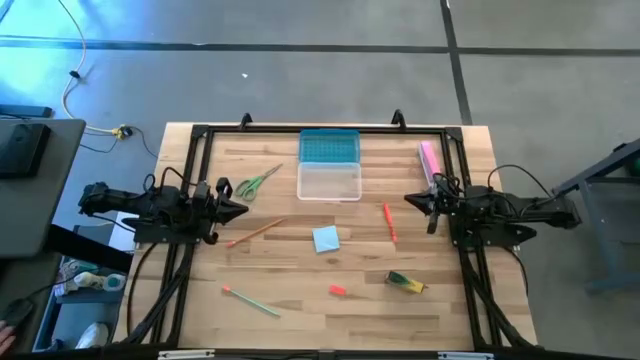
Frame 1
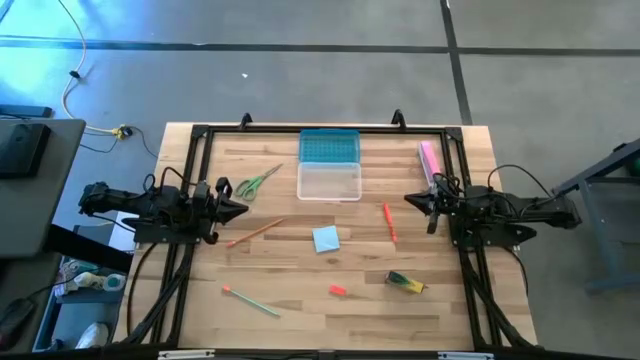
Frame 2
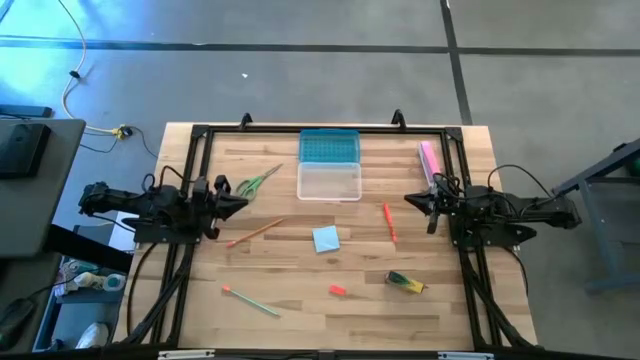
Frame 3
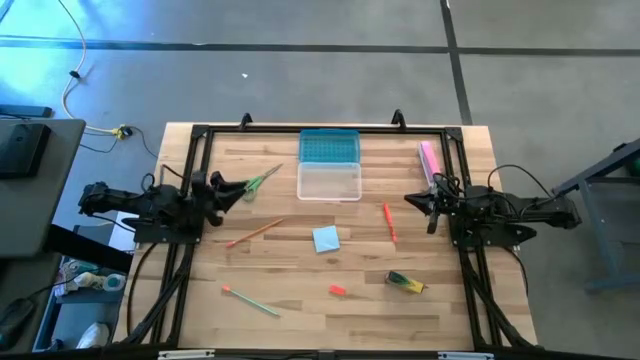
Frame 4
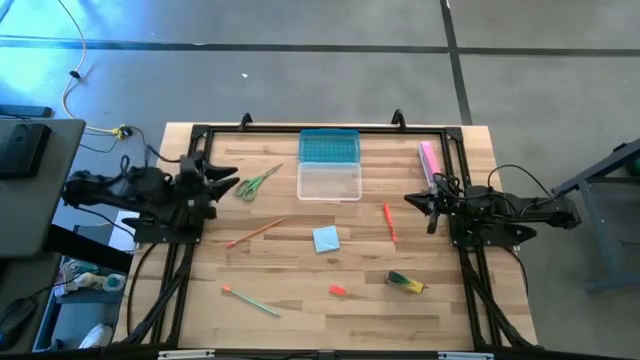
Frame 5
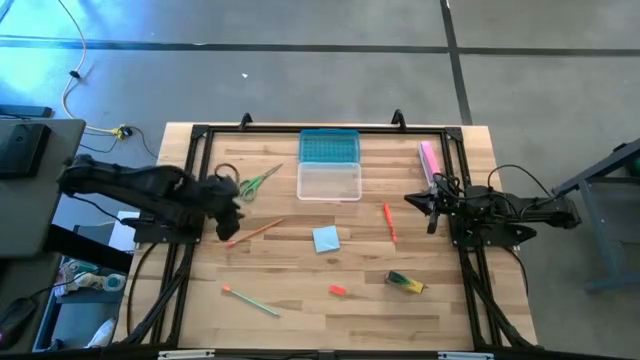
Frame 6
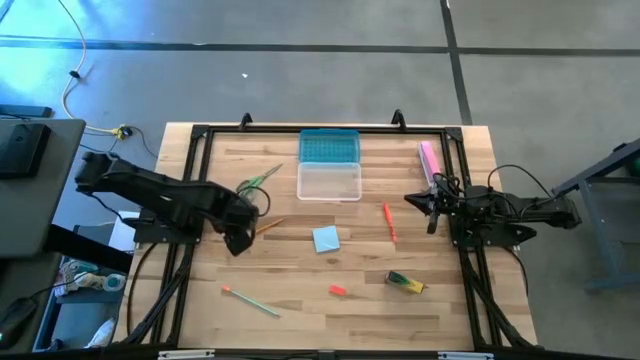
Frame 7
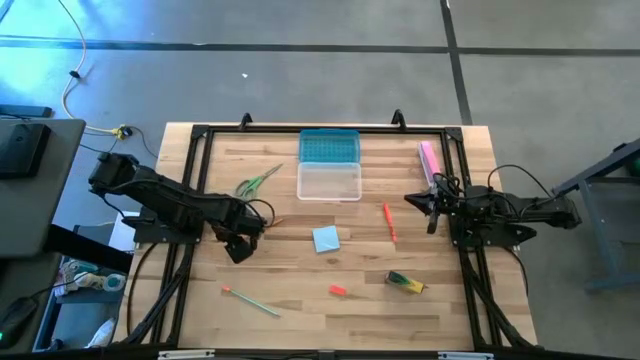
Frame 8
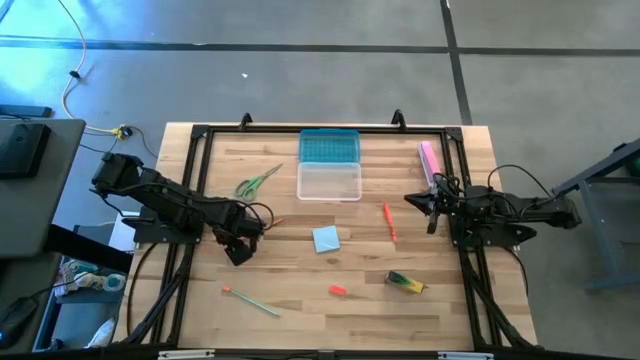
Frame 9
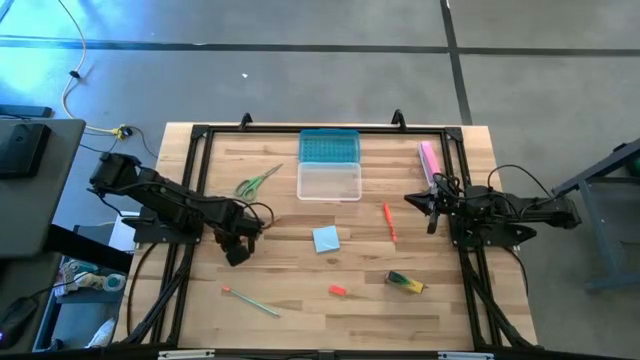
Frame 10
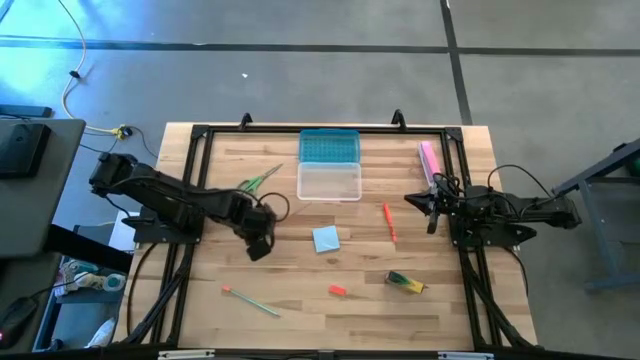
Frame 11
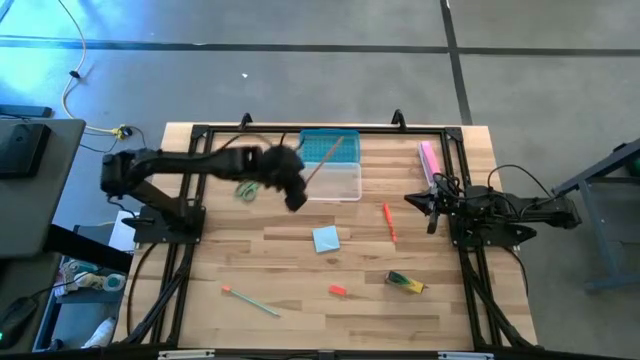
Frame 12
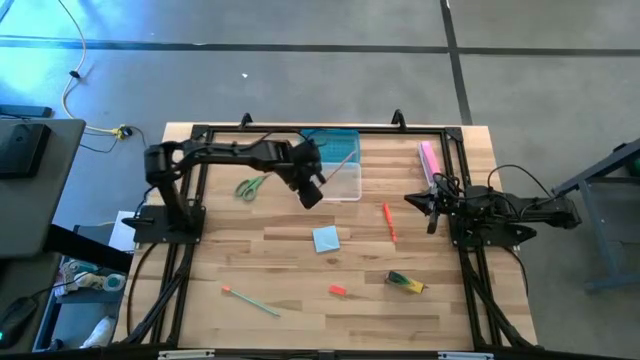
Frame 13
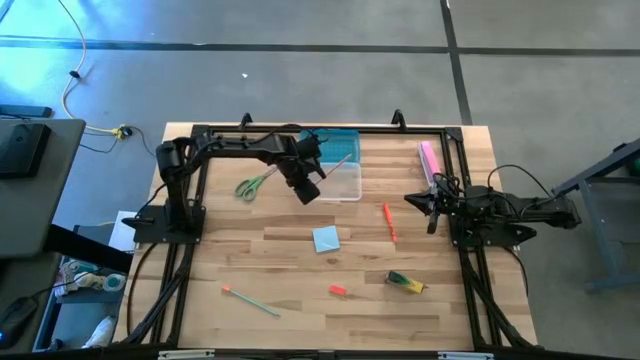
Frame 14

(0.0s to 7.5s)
Task: Pack school essentials
Put the orange pencil into the supply box

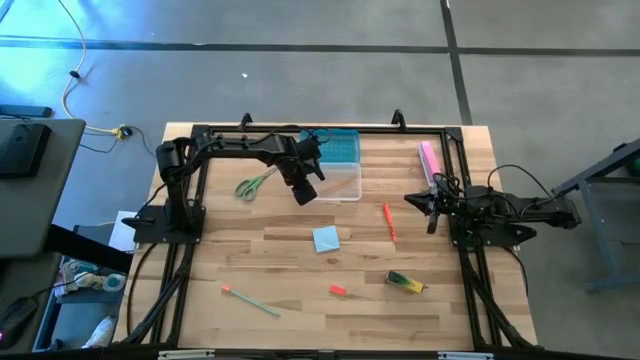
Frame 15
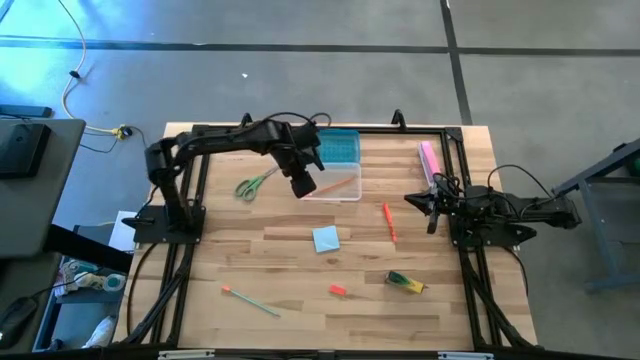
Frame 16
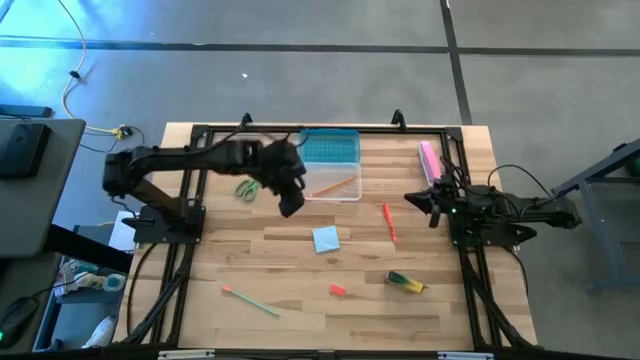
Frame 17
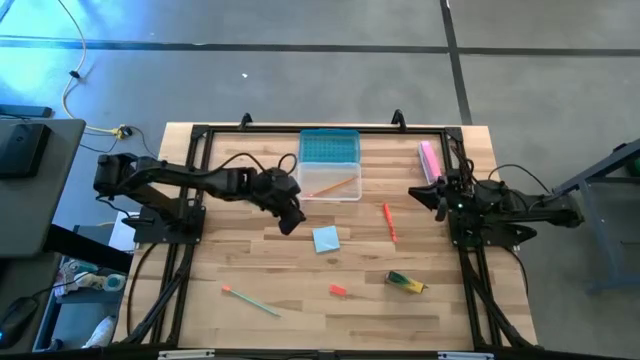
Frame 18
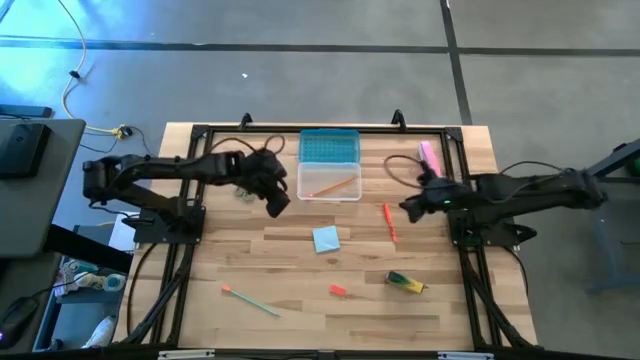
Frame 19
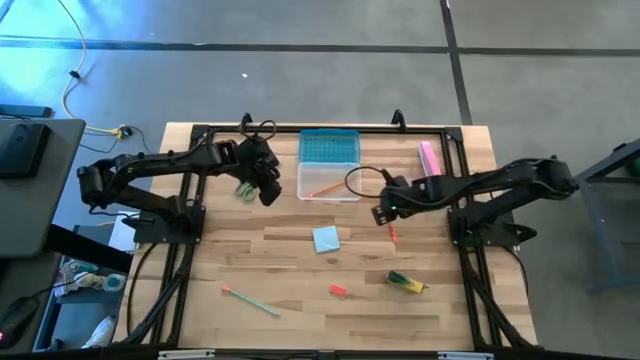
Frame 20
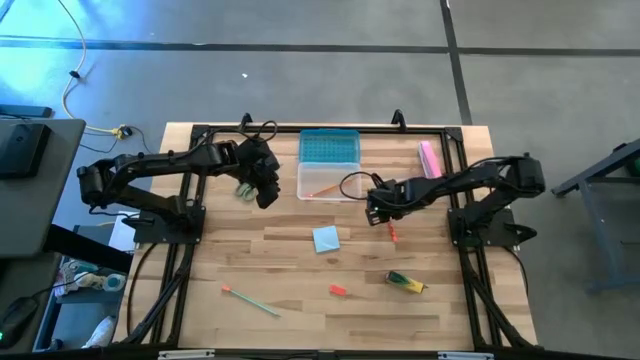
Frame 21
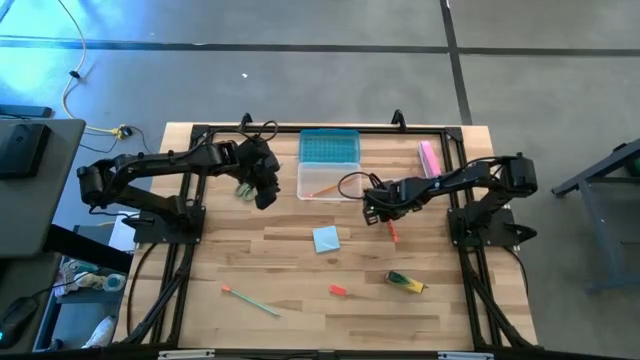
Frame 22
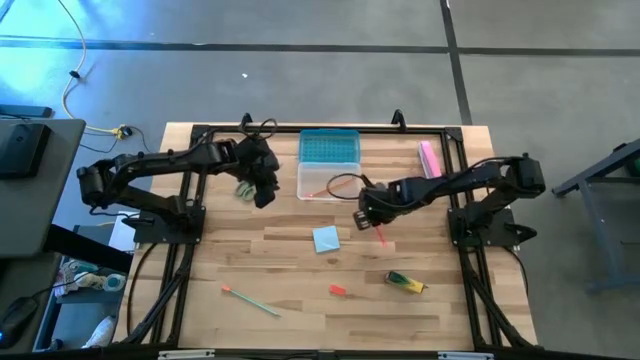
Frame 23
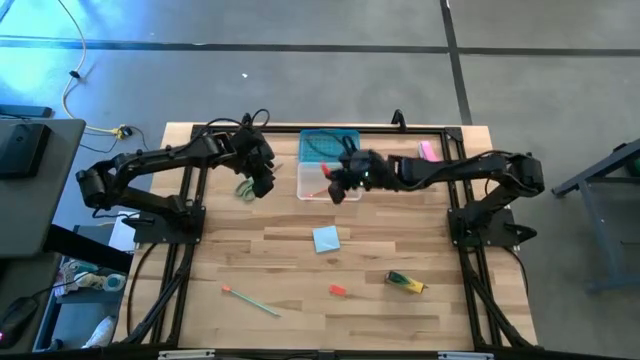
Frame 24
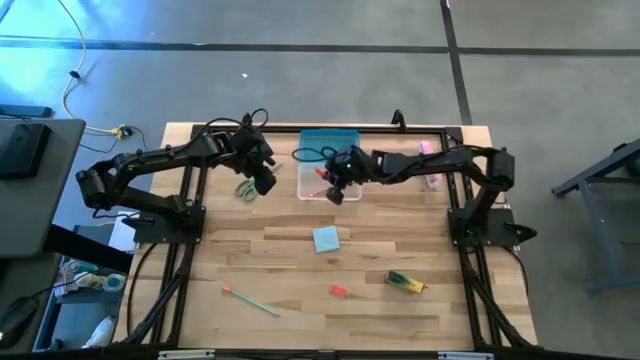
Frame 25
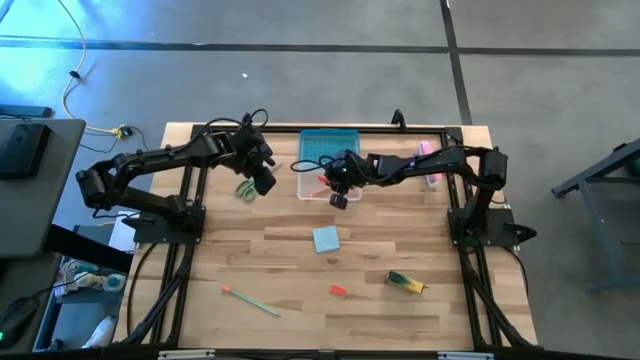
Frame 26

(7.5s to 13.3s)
Put the orange pen into the supply box

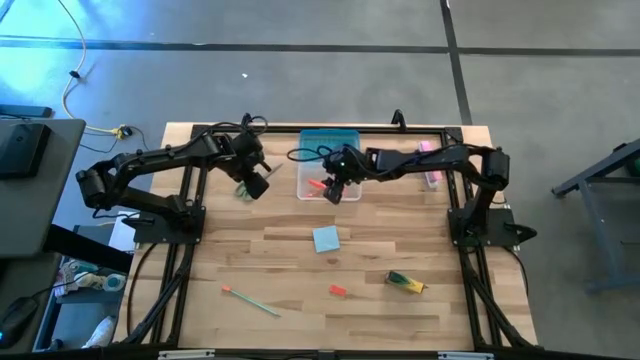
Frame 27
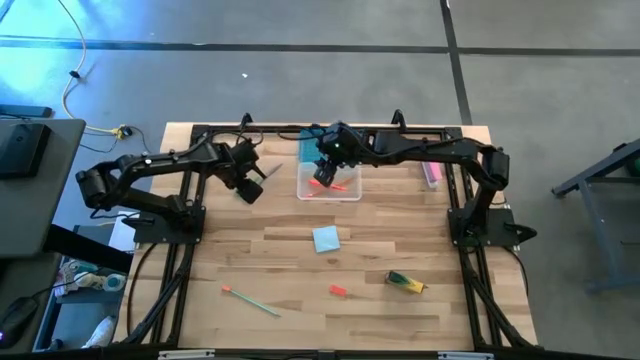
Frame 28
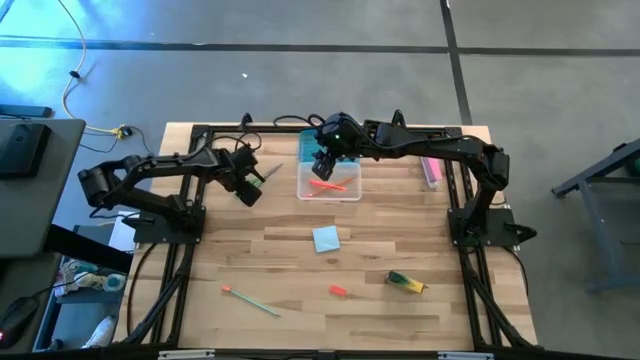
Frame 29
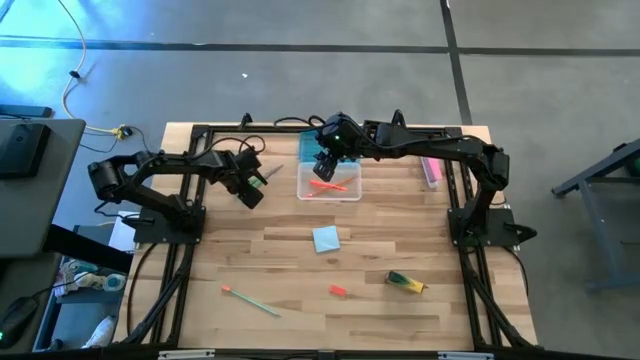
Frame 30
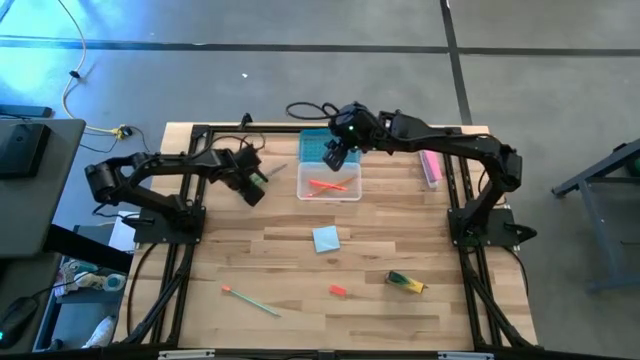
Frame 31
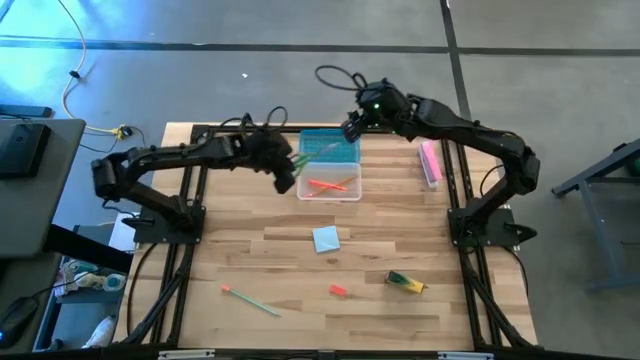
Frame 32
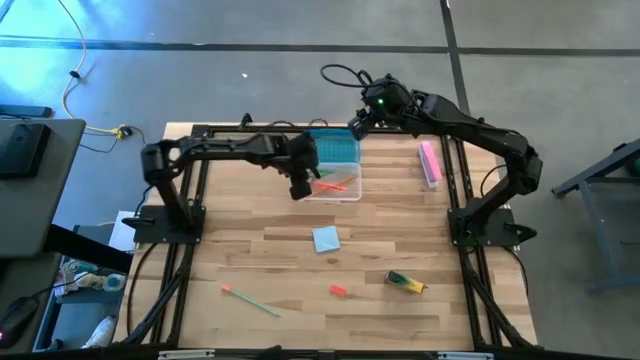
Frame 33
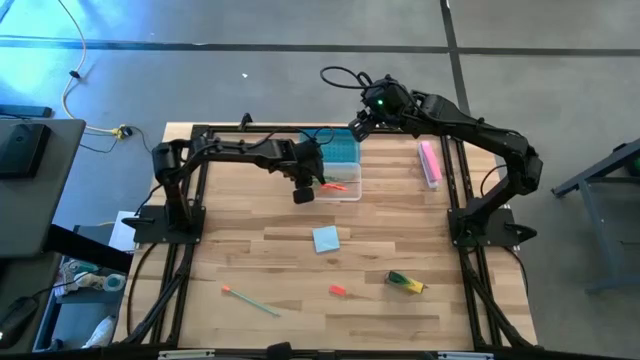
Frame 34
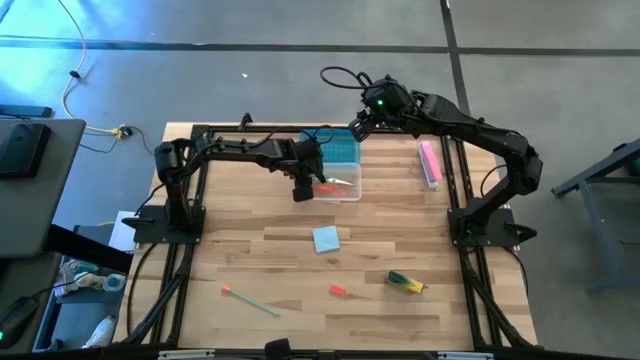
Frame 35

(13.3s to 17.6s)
Put the green scissors into the supply box

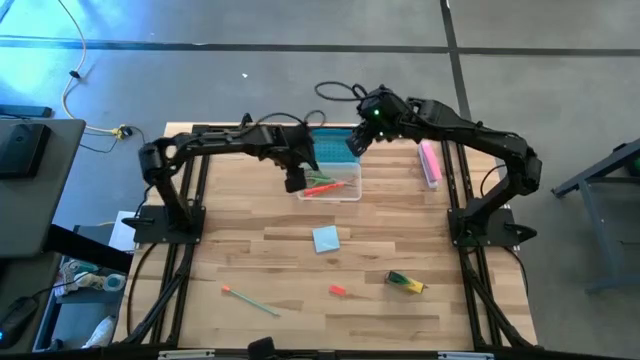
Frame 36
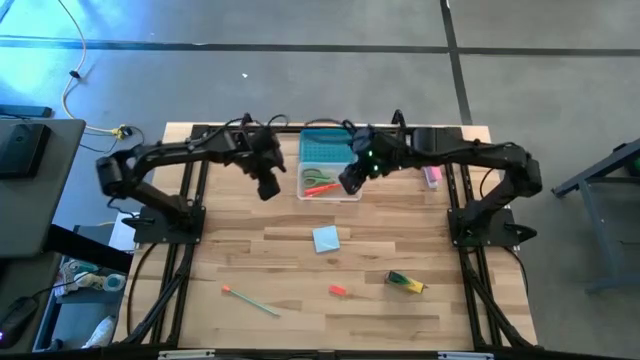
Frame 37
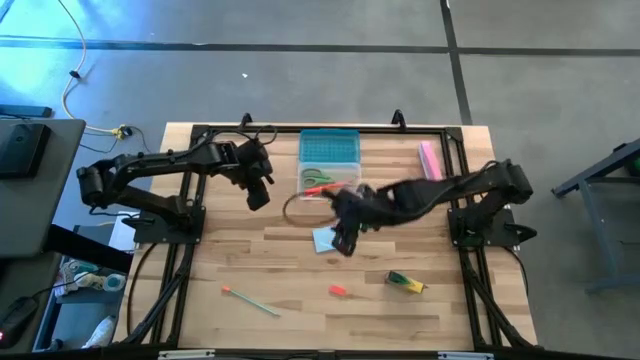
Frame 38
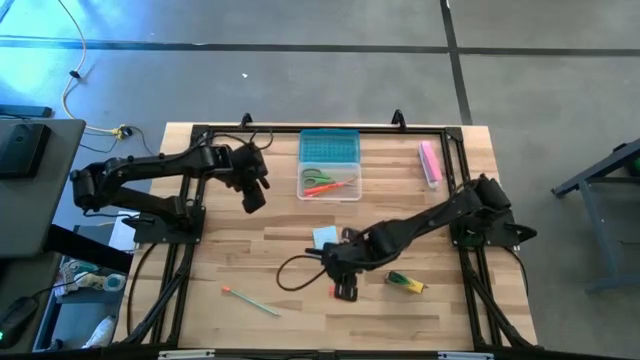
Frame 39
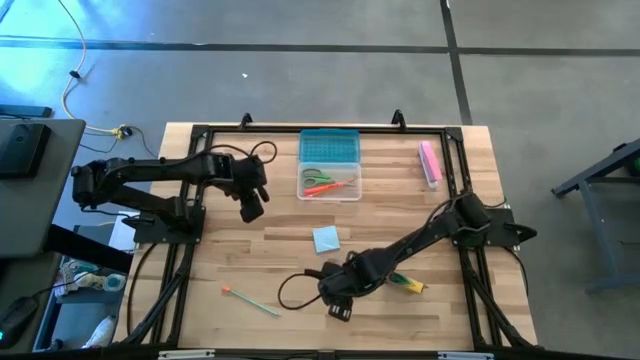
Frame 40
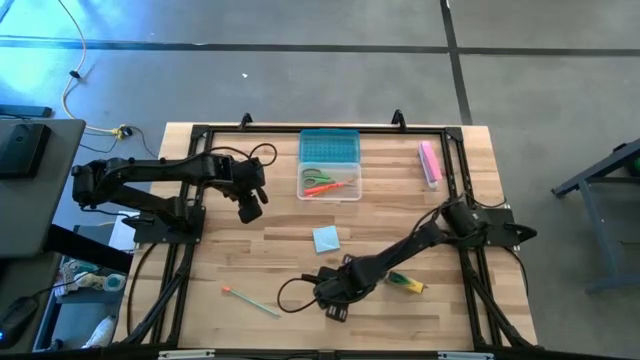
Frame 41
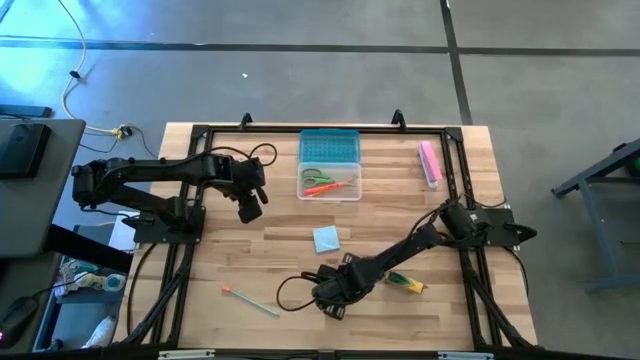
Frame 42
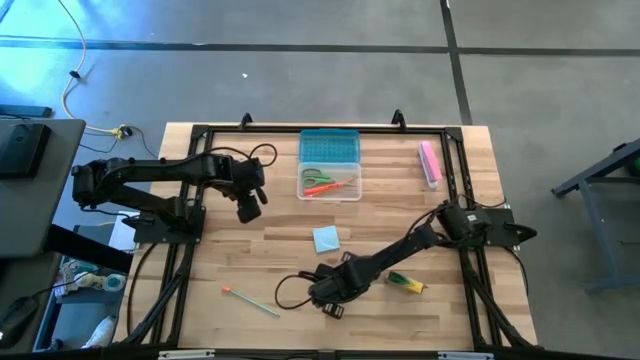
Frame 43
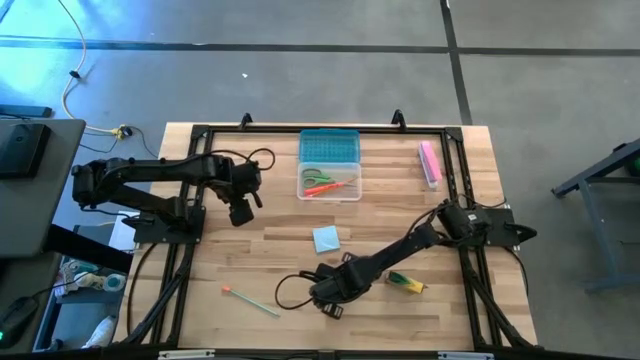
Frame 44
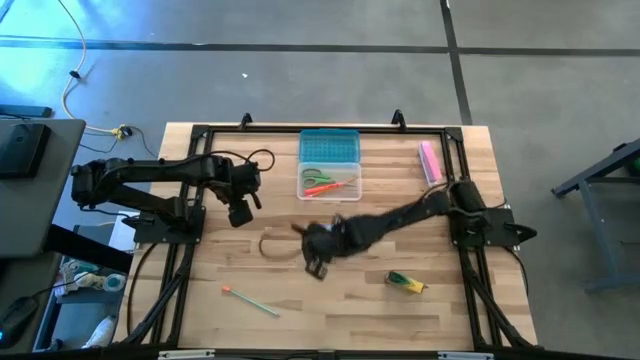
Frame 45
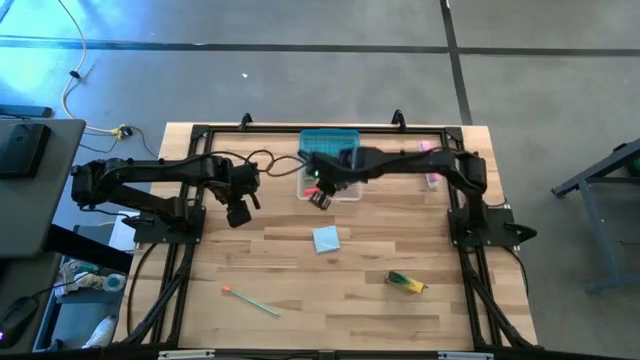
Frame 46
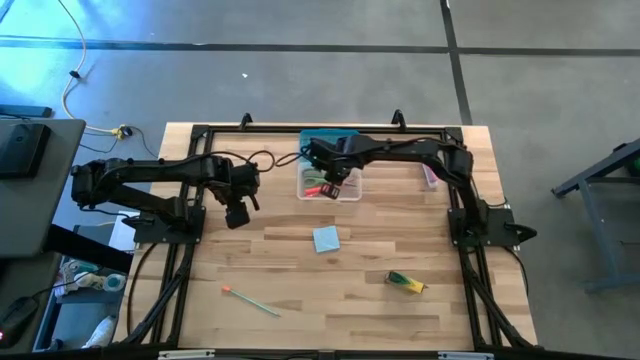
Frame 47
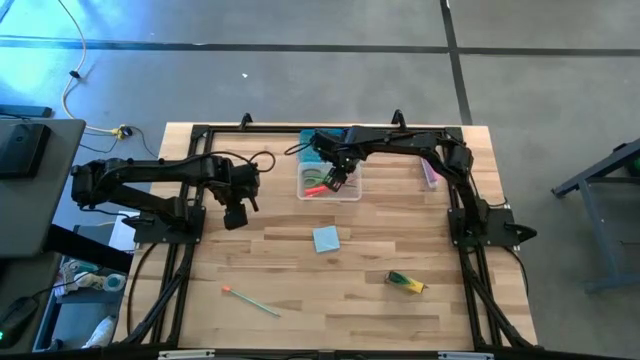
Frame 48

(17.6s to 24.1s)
Put the orange eraser into the supply box
